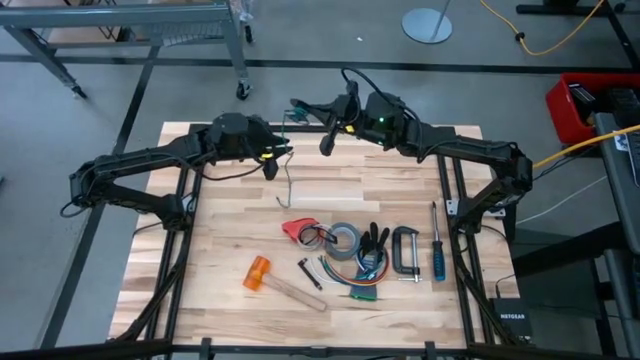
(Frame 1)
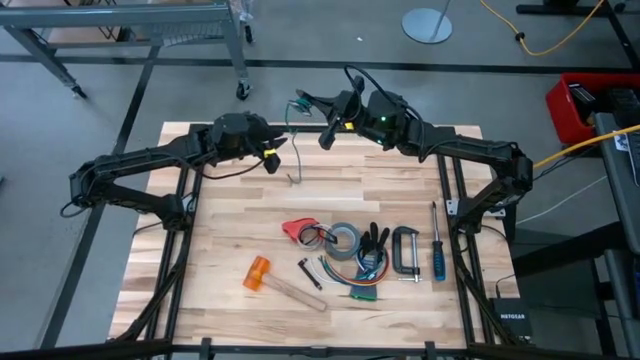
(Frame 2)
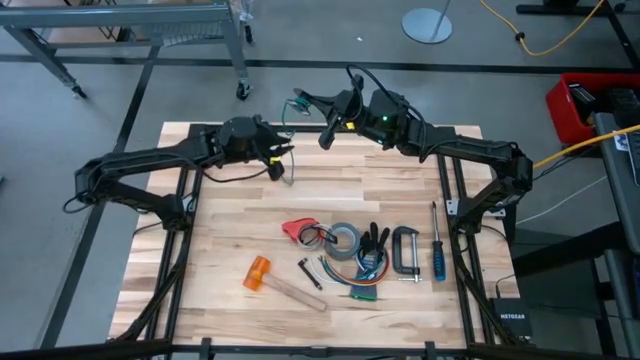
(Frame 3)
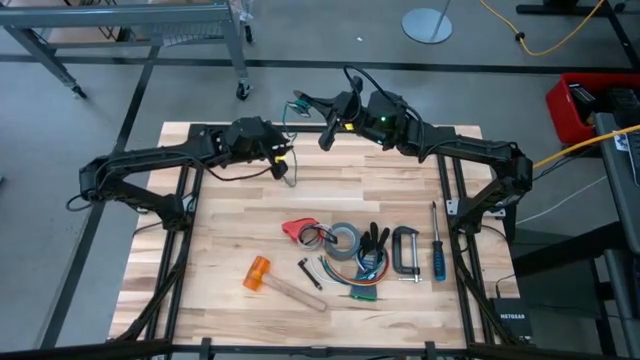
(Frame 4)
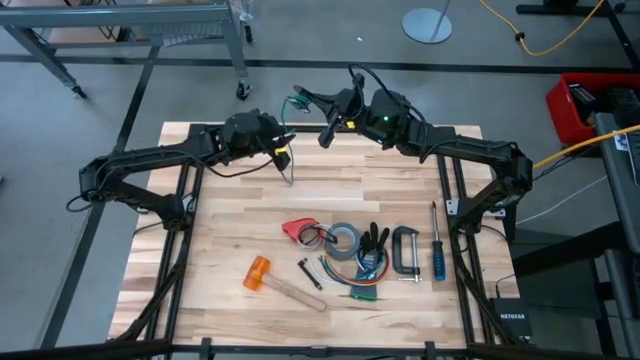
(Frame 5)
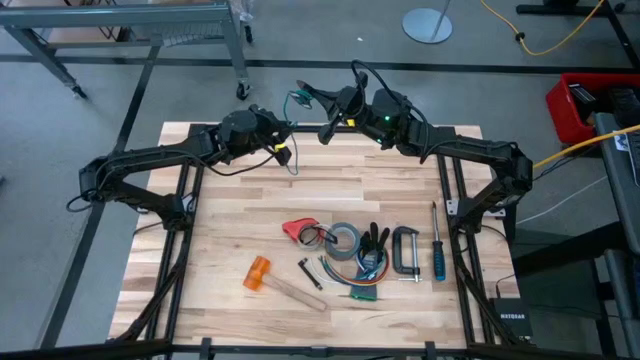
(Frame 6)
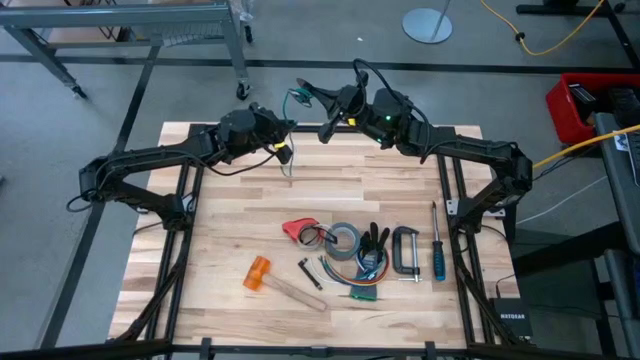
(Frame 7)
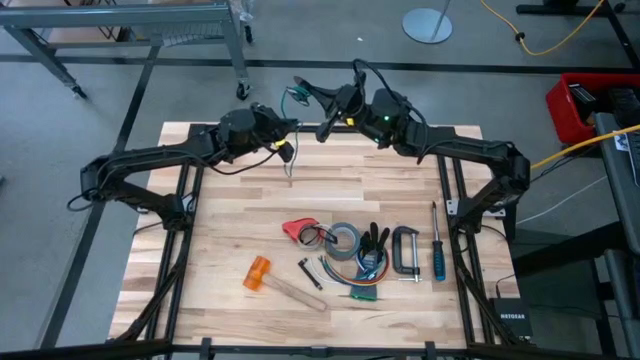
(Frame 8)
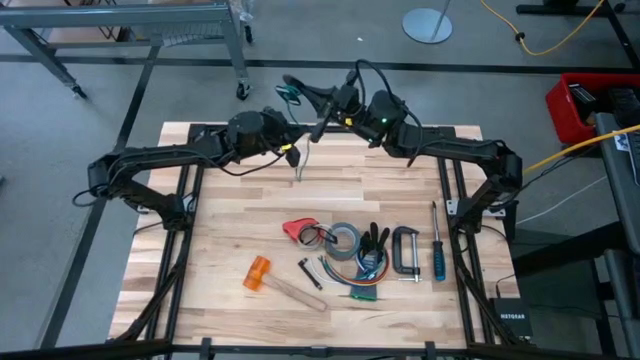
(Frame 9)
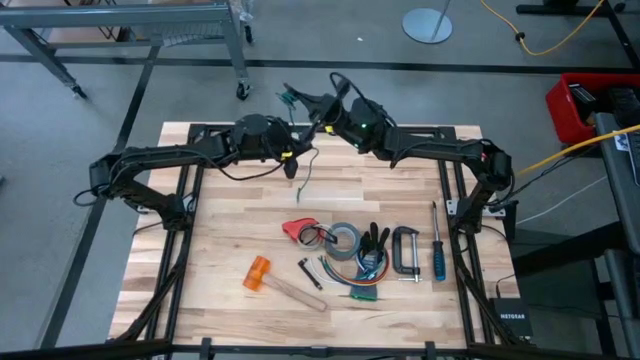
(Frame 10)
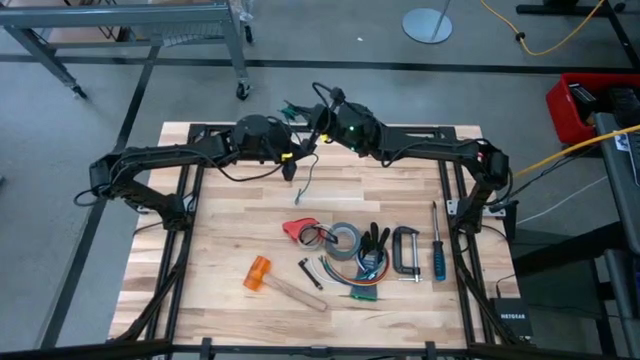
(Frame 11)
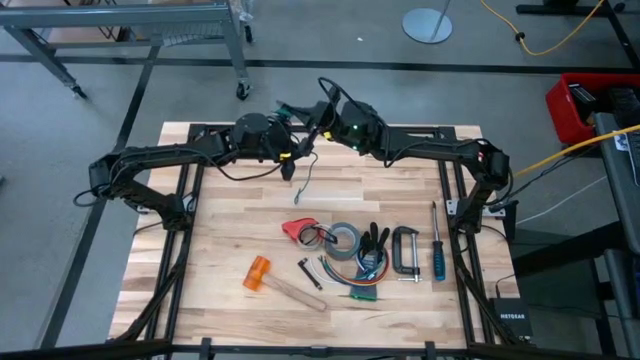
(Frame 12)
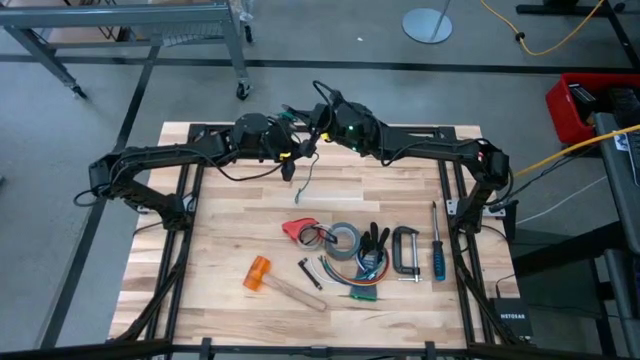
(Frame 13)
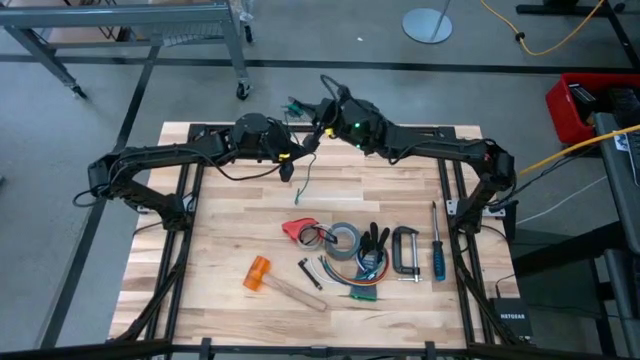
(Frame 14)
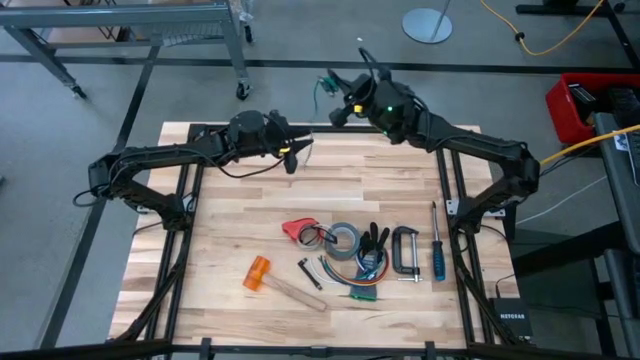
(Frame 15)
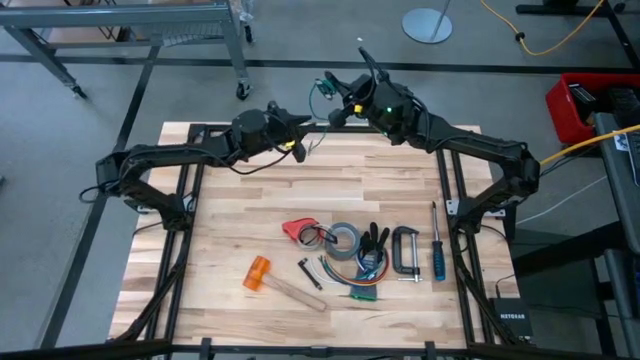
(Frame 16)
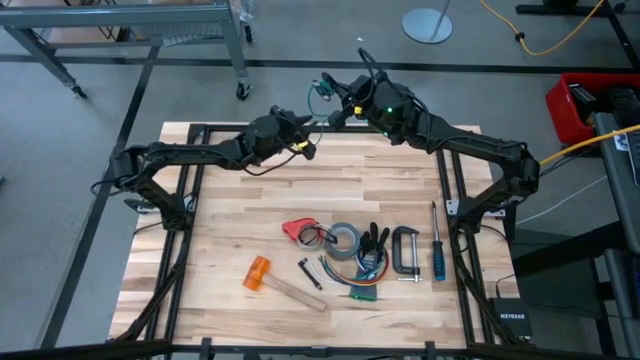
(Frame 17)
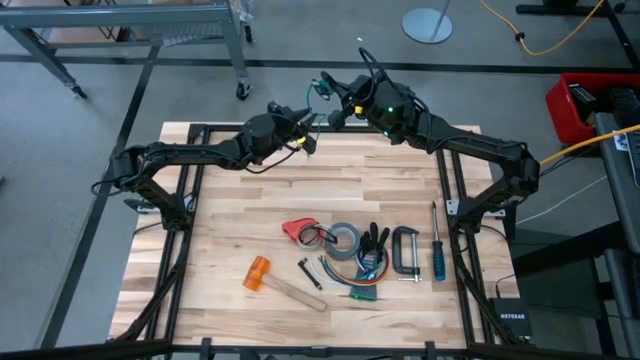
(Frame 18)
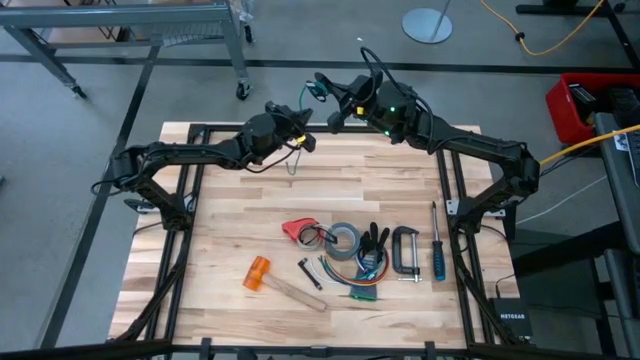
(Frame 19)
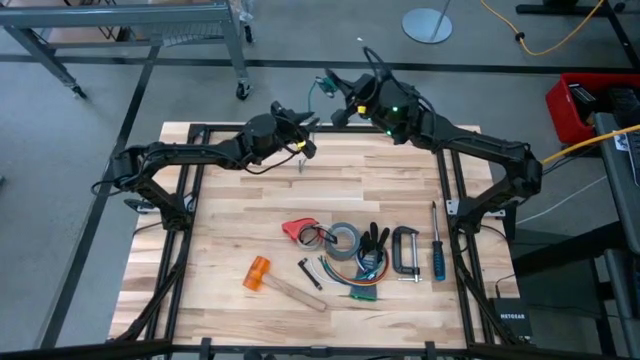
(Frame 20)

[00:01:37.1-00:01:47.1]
Task: Coil cords
Coil the green cable wire on the black spool

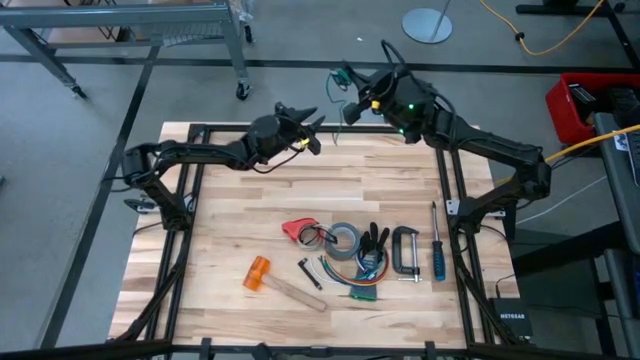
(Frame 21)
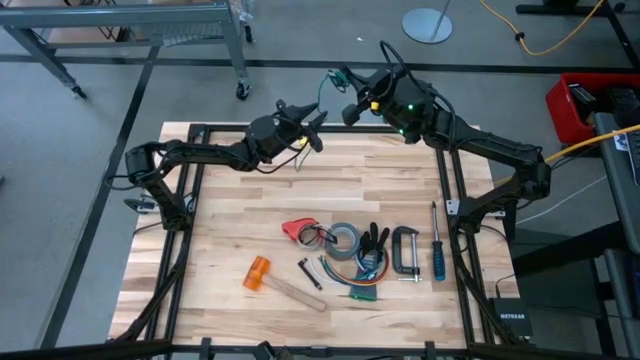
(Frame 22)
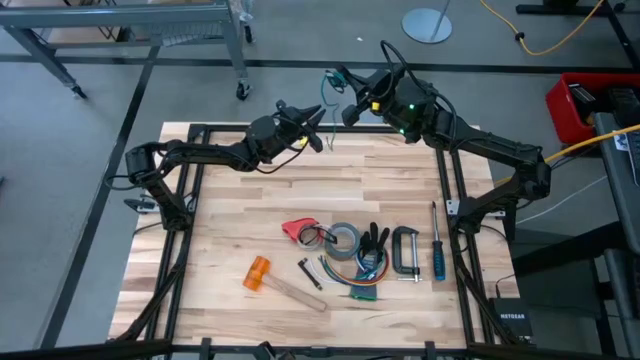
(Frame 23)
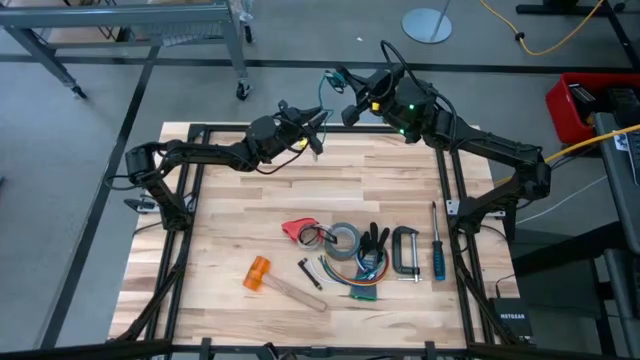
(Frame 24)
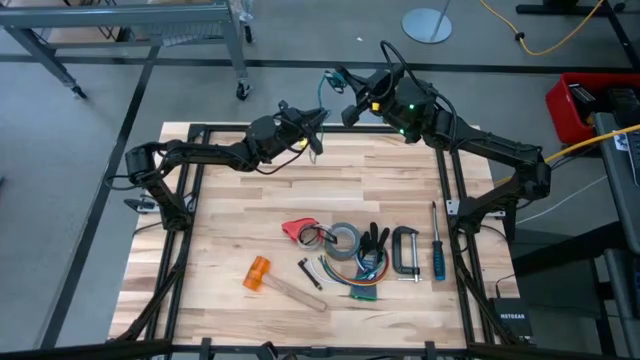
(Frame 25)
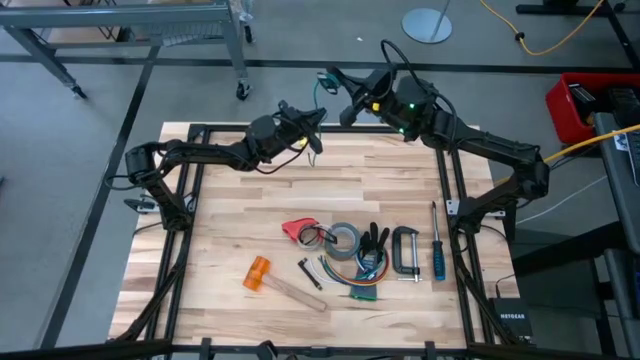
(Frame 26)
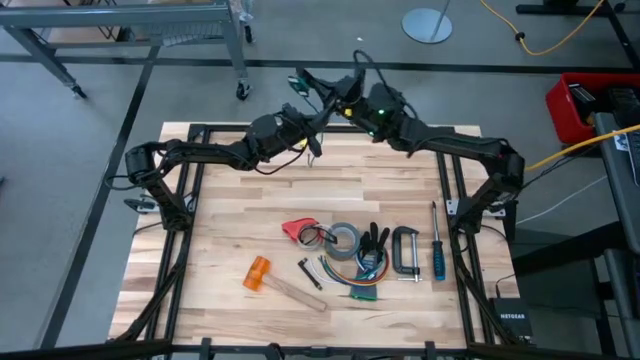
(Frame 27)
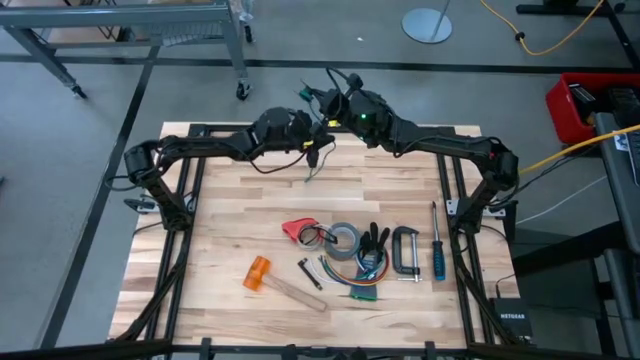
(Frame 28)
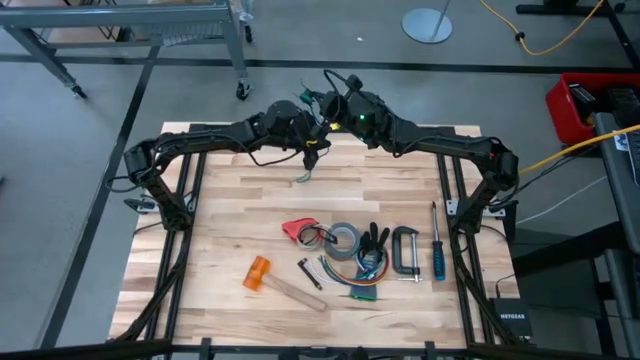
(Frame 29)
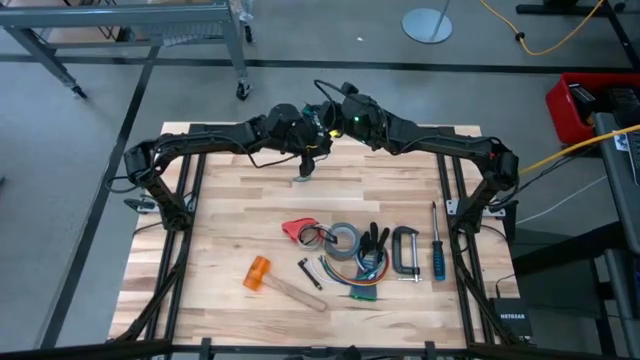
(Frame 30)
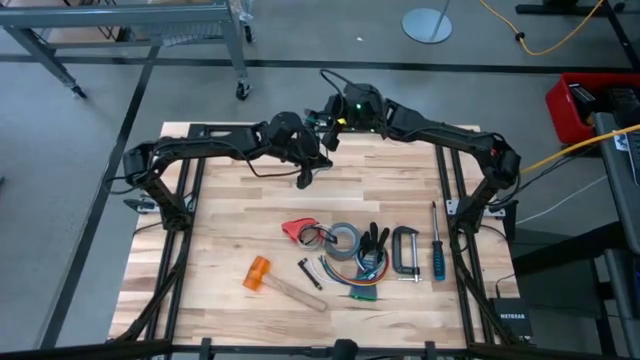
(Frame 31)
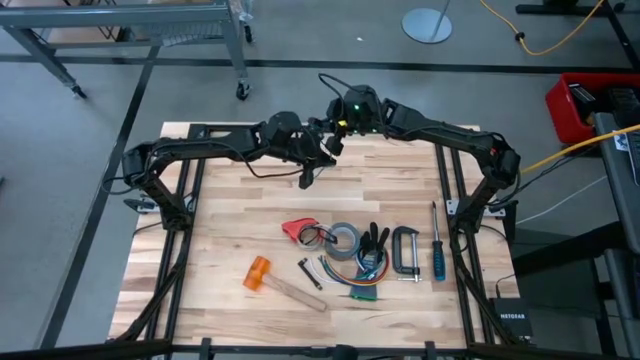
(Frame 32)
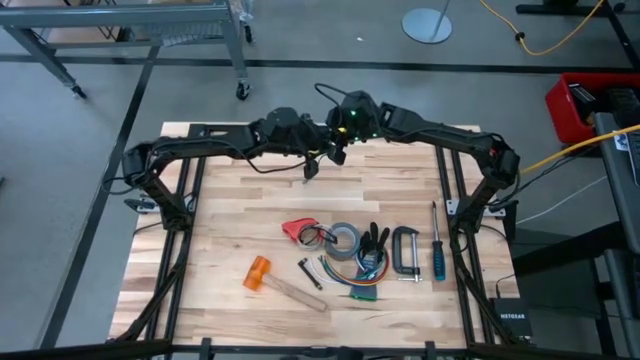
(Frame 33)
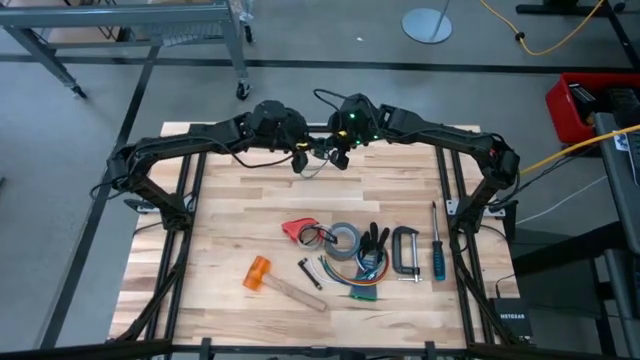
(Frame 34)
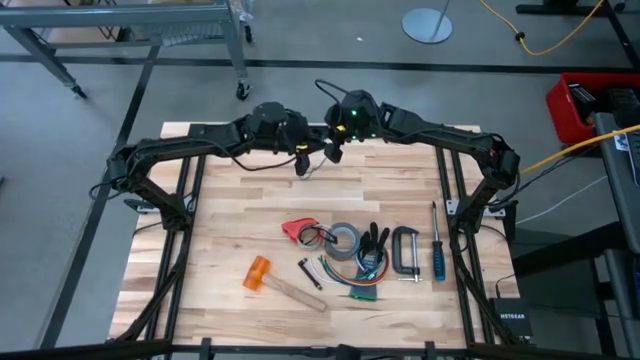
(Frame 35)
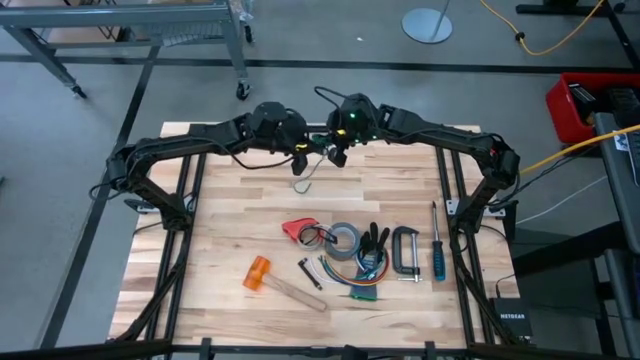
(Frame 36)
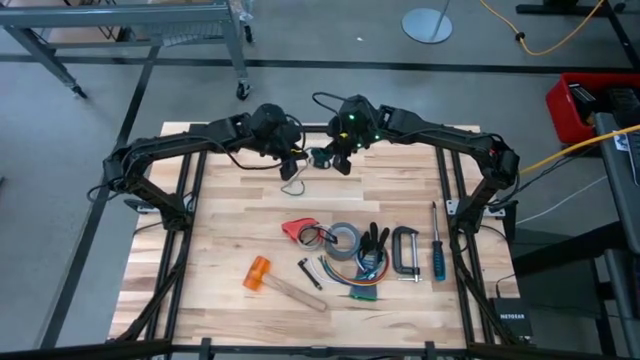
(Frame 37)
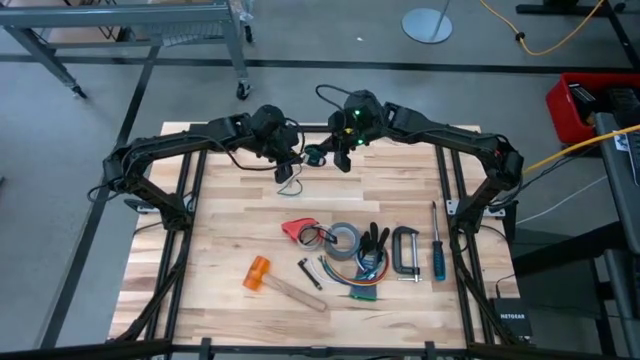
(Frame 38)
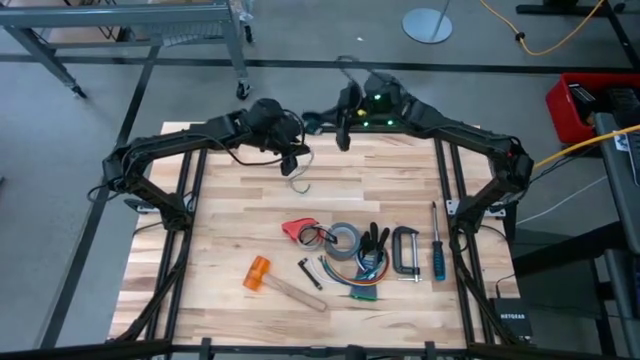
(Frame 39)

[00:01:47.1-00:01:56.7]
Coil the green cable wire on the black spool

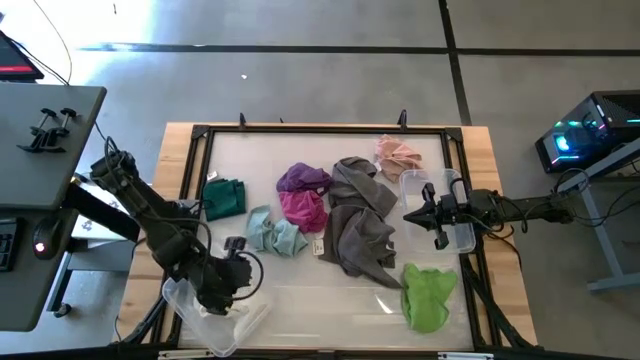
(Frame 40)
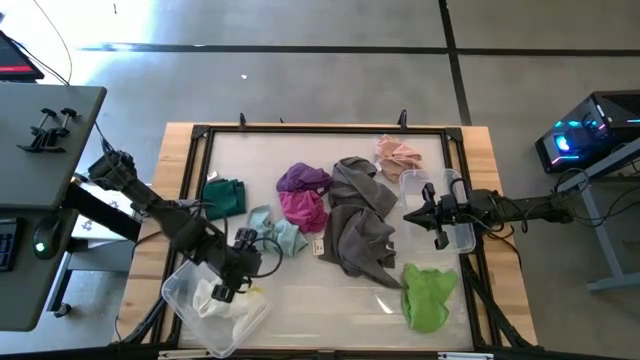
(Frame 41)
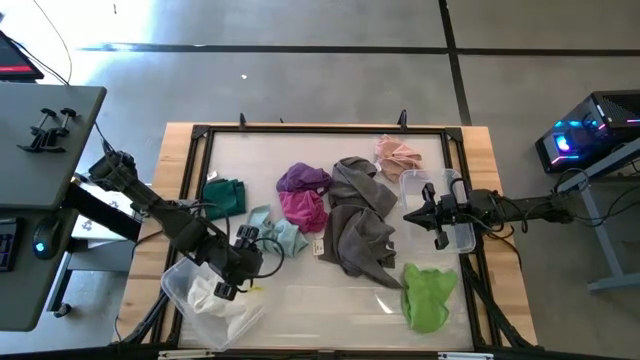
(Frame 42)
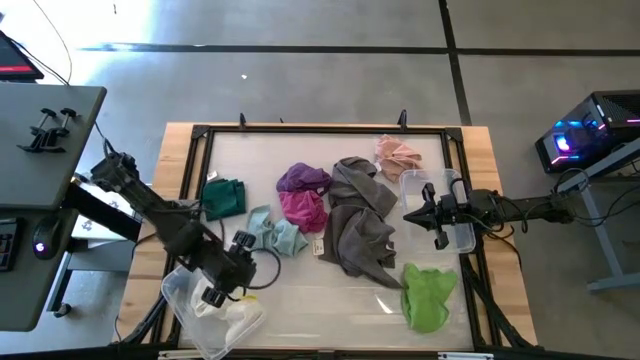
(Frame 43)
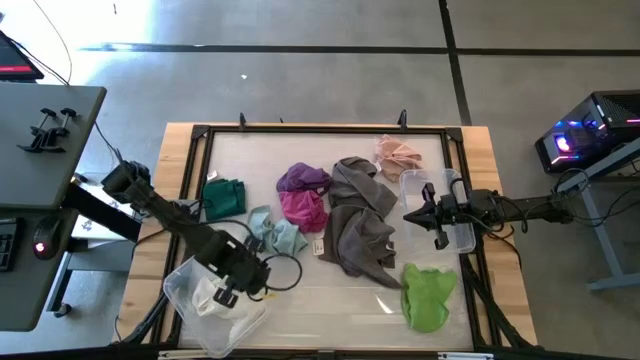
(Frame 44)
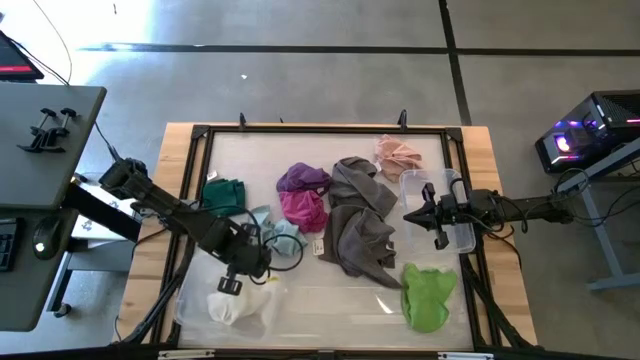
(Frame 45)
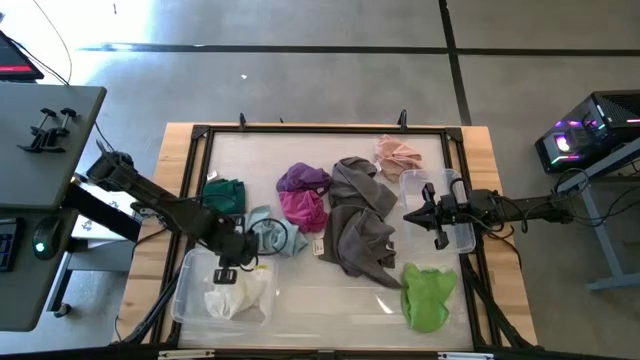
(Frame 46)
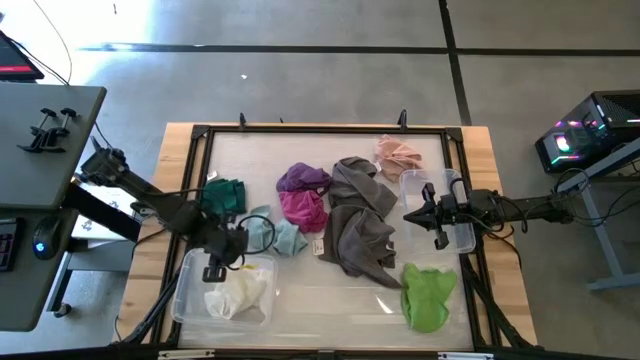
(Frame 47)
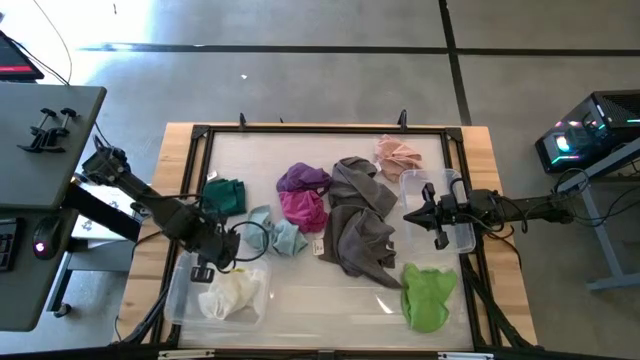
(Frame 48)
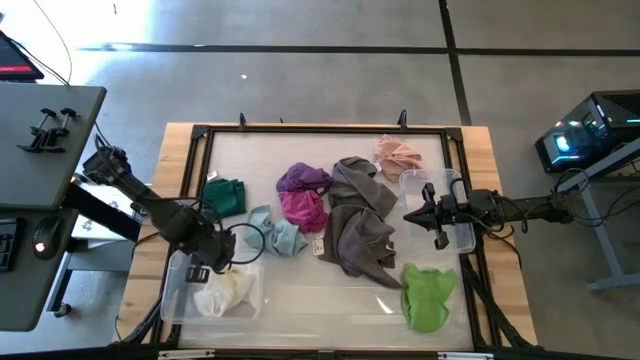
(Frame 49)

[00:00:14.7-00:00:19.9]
Task: Sort microfiber towel by color & place in baskets
Adjust the bottom transparent bin
